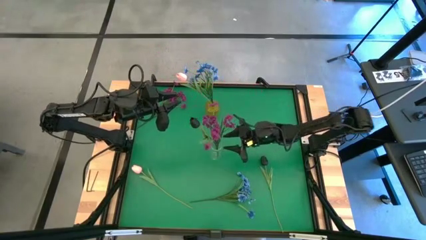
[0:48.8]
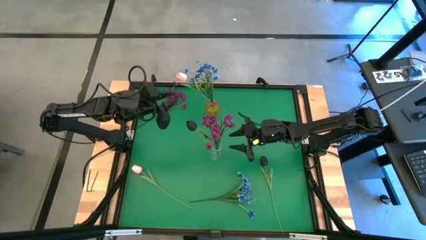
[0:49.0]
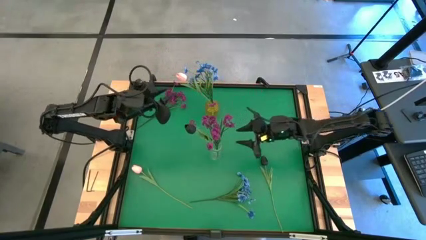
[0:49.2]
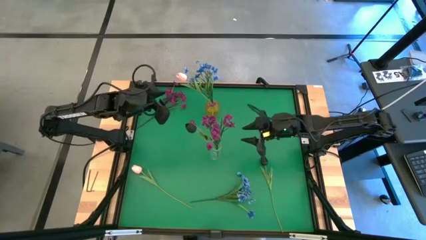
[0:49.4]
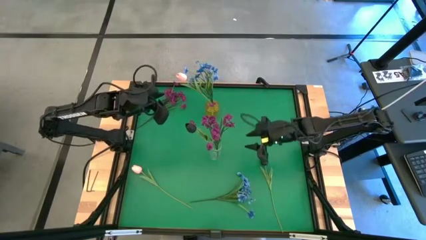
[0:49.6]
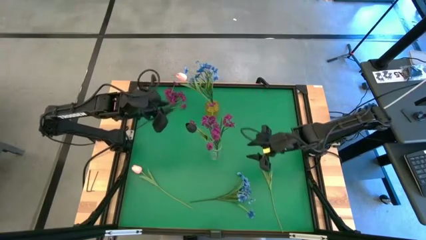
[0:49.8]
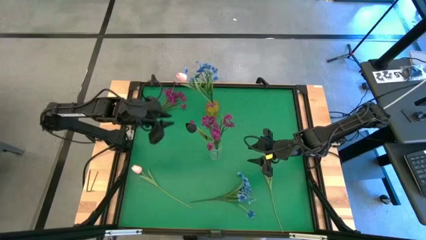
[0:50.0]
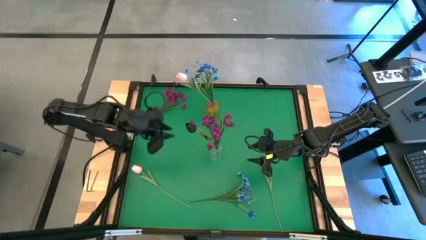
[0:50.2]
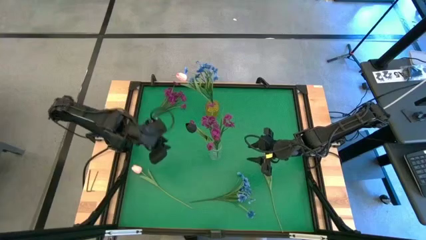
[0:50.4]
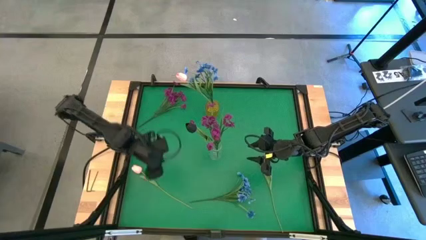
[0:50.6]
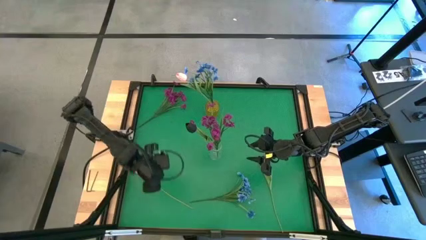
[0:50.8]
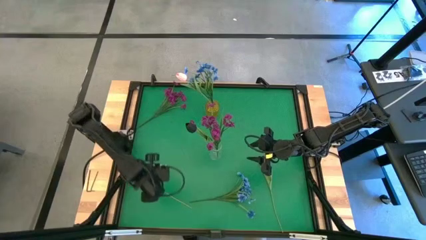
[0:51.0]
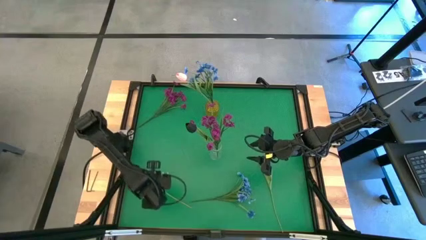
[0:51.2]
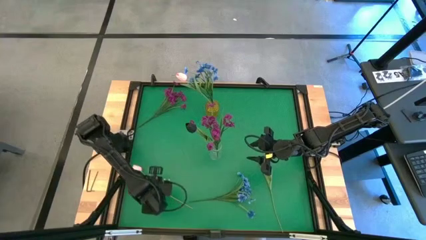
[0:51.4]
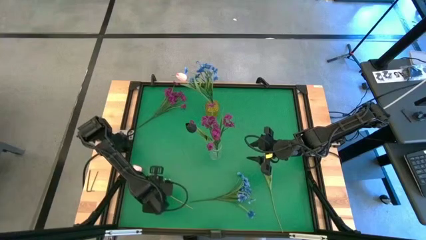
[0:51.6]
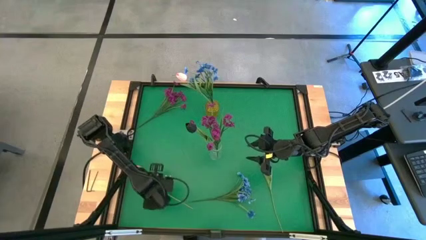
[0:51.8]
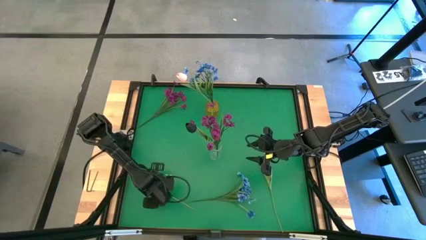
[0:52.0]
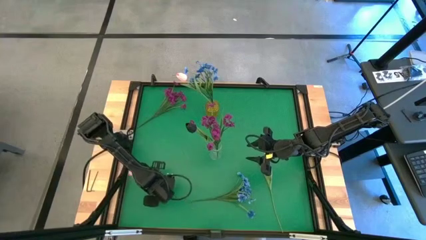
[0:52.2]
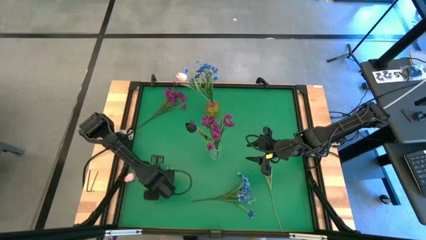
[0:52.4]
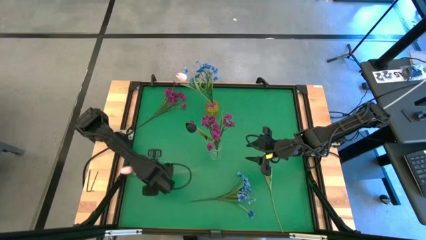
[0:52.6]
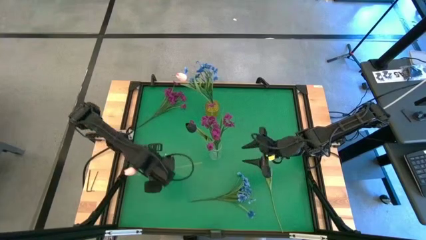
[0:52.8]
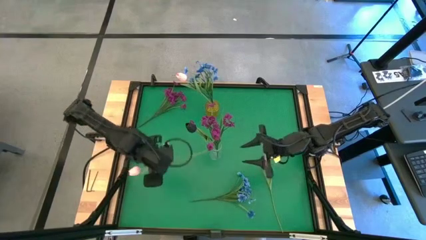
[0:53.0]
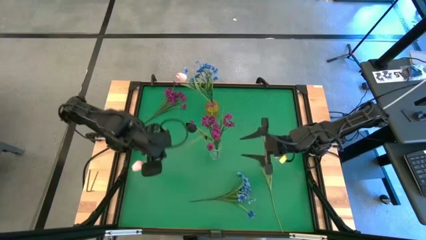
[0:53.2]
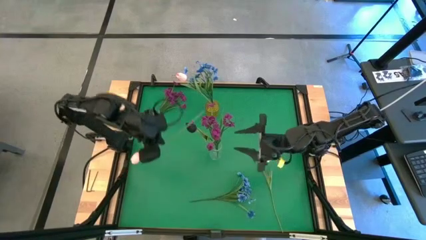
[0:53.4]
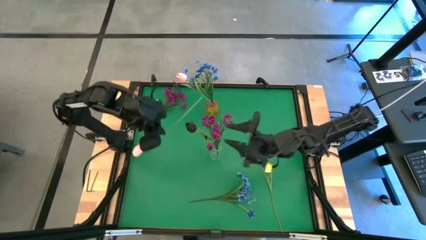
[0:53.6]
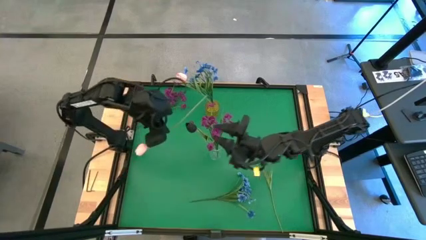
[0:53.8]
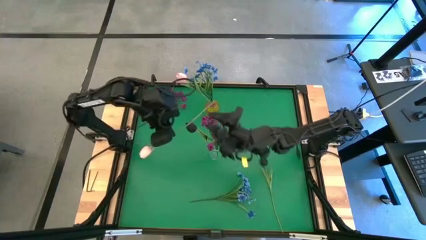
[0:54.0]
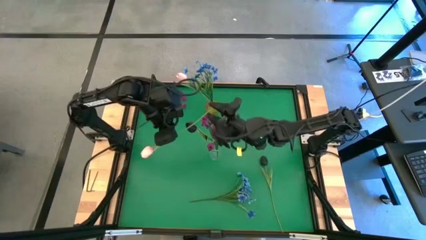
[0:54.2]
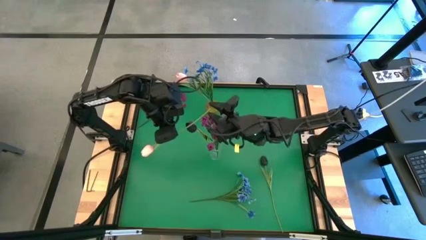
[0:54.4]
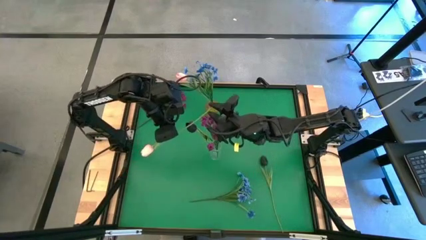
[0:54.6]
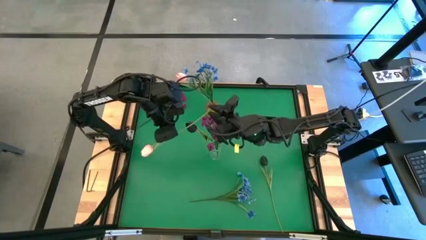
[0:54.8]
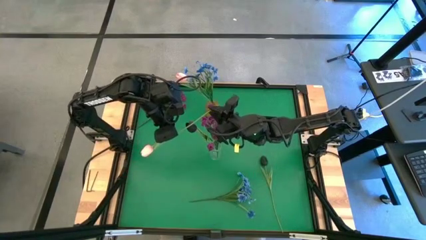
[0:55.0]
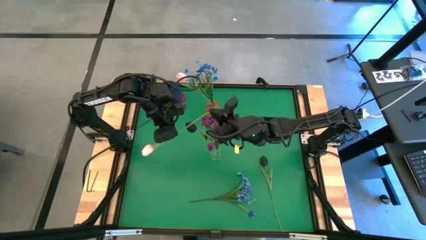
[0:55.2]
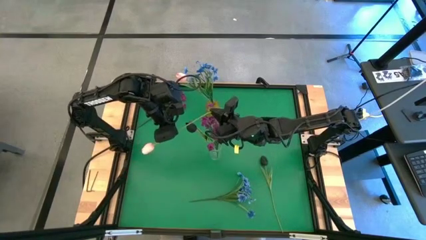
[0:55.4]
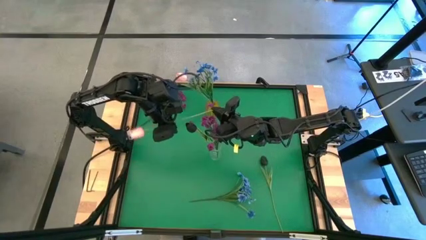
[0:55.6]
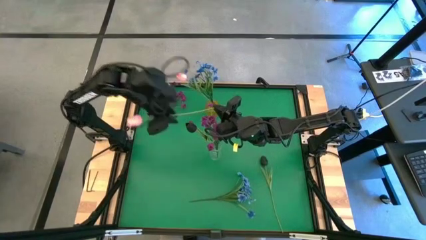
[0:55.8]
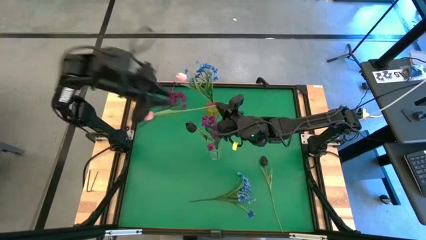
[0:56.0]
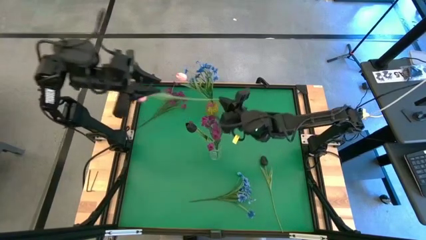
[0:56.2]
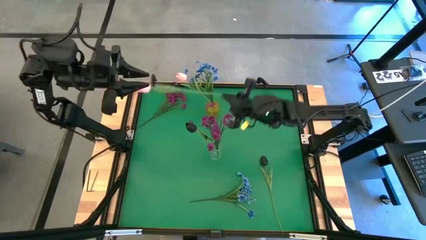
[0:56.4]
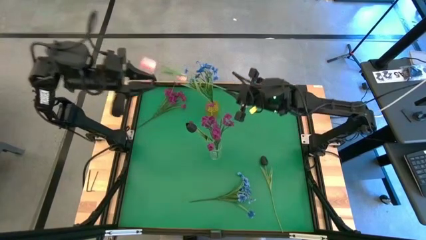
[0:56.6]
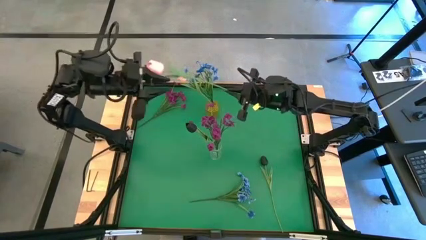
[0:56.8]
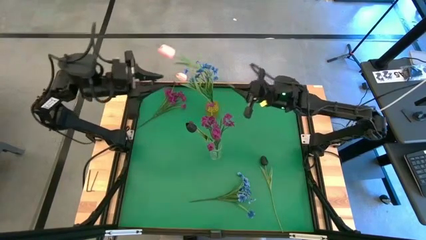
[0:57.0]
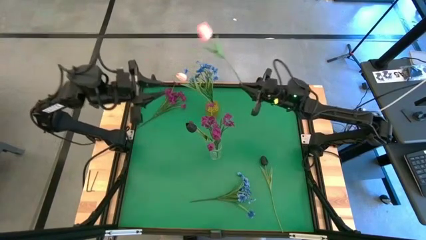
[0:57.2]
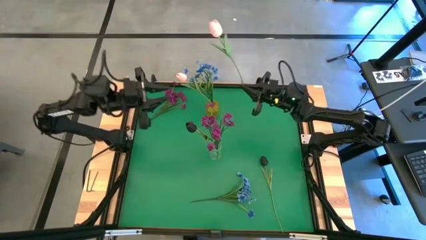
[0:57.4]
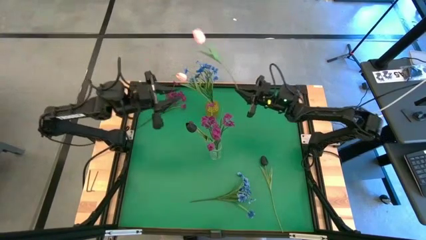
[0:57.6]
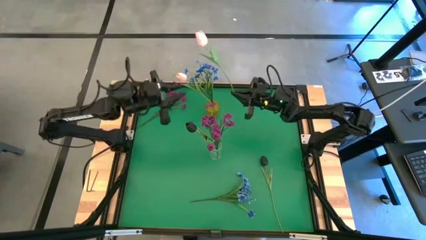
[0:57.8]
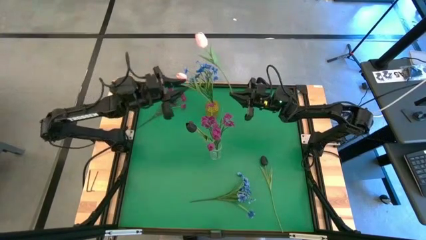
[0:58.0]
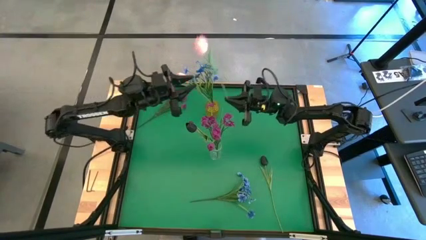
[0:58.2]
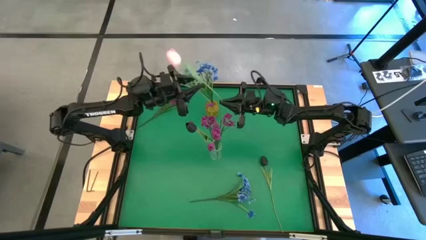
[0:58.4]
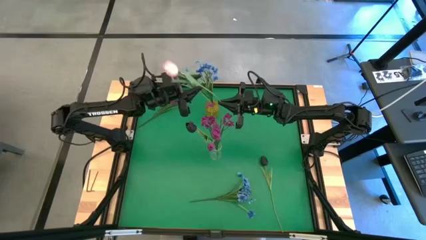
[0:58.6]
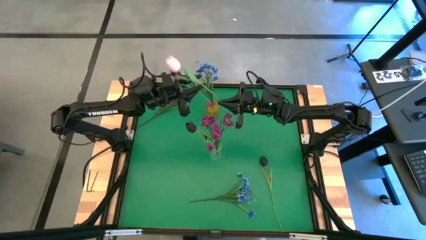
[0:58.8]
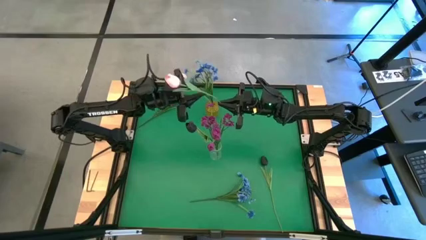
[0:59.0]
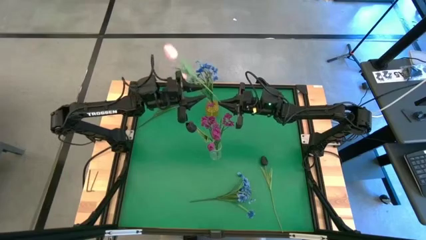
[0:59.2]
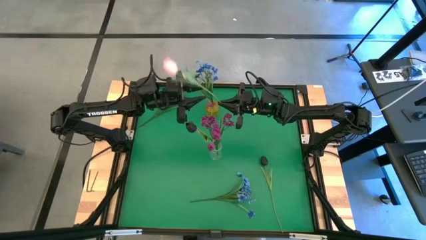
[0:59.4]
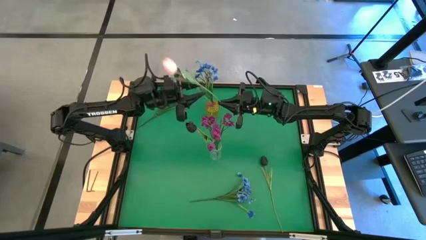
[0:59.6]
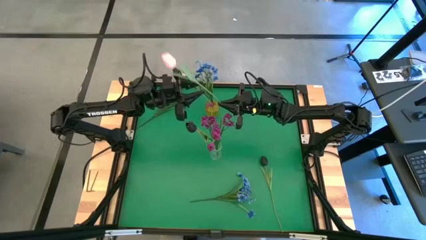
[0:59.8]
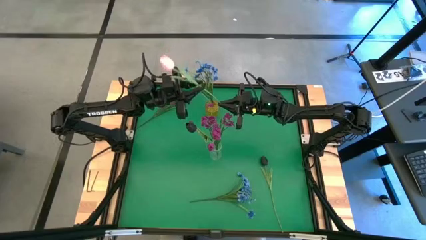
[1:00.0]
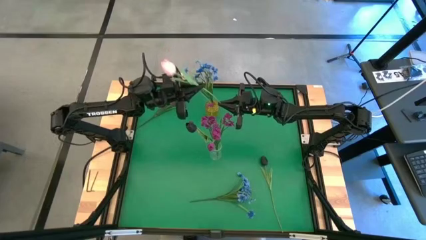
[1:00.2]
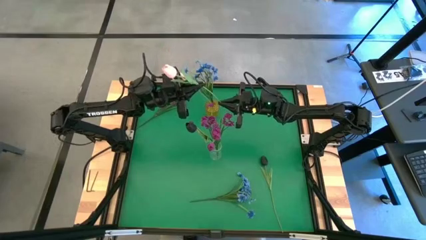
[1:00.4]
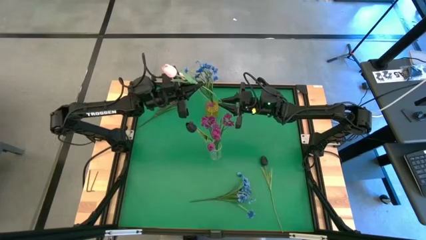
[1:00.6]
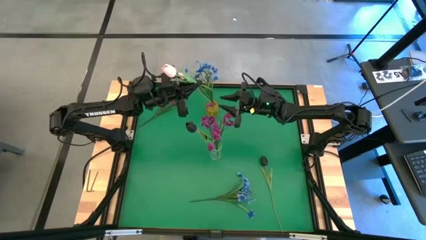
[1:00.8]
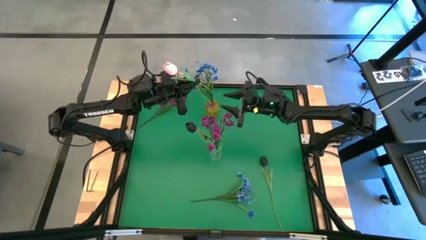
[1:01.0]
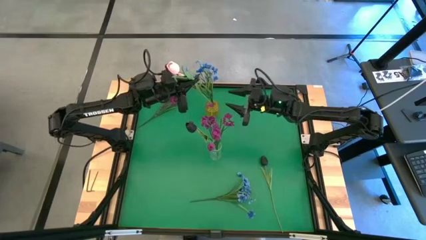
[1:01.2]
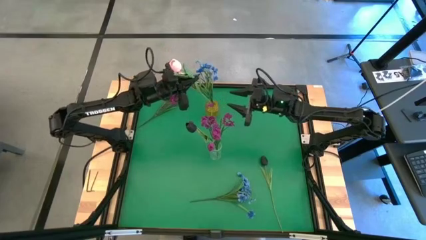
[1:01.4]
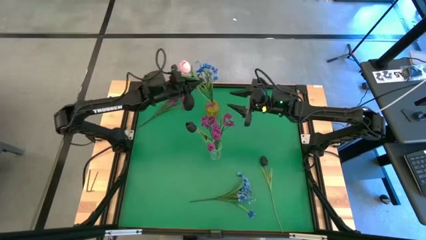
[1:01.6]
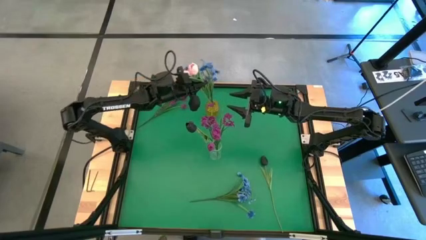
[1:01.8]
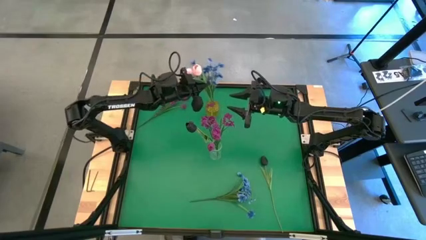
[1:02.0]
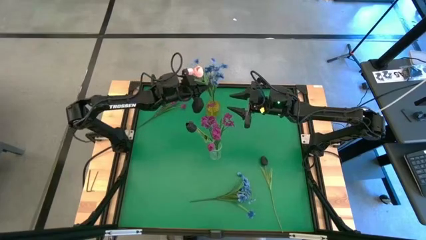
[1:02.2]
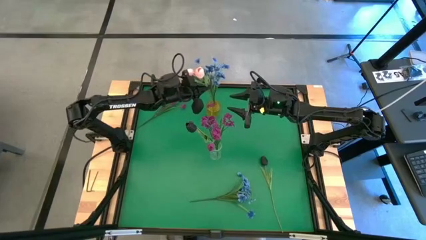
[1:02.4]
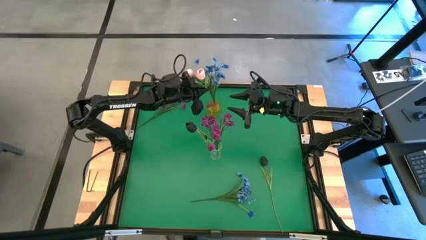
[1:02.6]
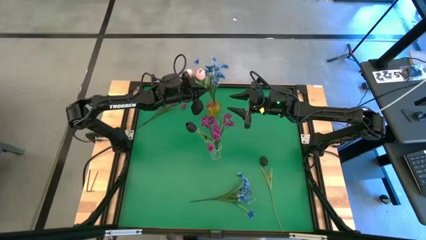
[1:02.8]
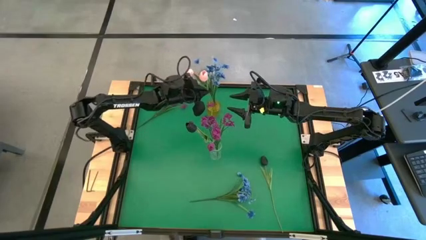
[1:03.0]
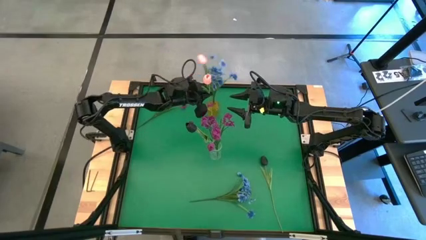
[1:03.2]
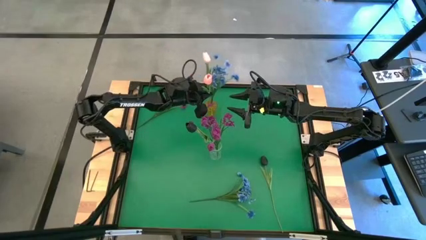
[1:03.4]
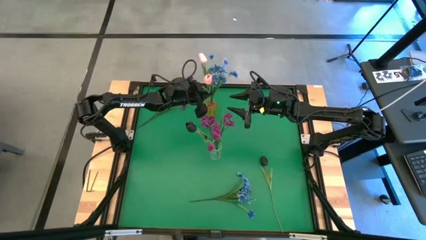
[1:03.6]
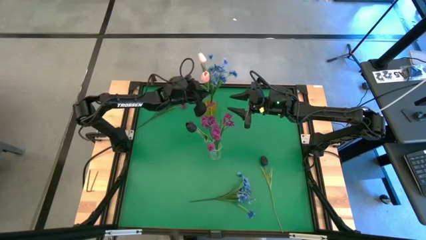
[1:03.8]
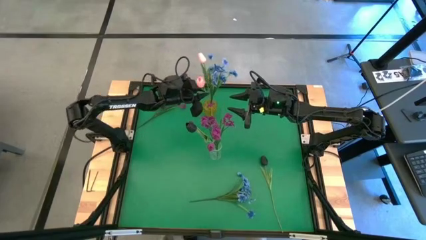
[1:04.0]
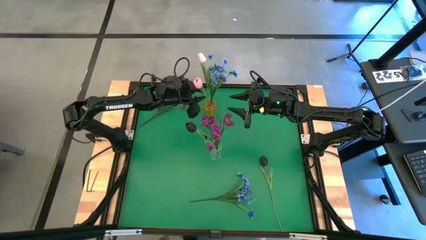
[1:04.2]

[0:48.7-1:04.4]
Task: Sort flowers into vase by color
Put the pink flower into the yellow vase
